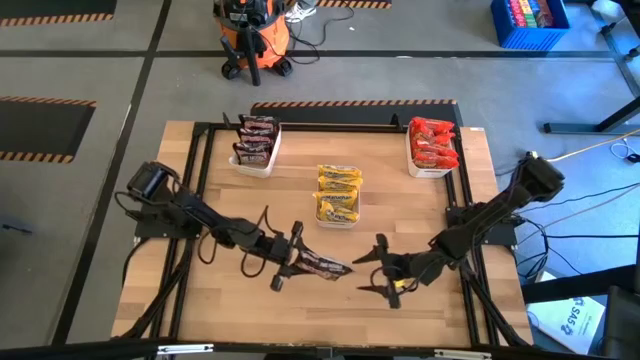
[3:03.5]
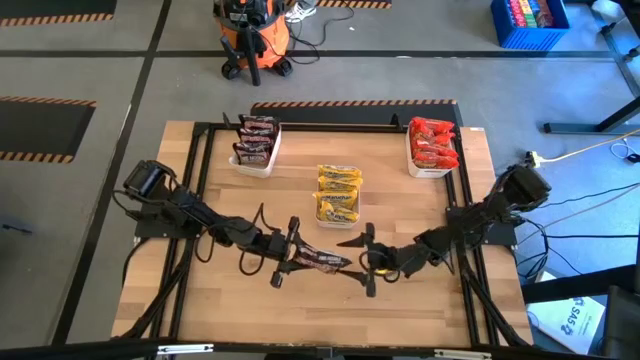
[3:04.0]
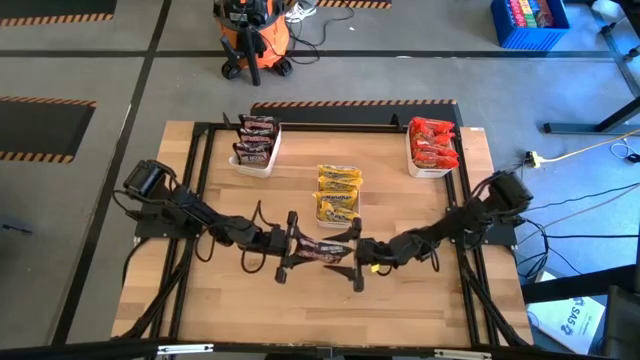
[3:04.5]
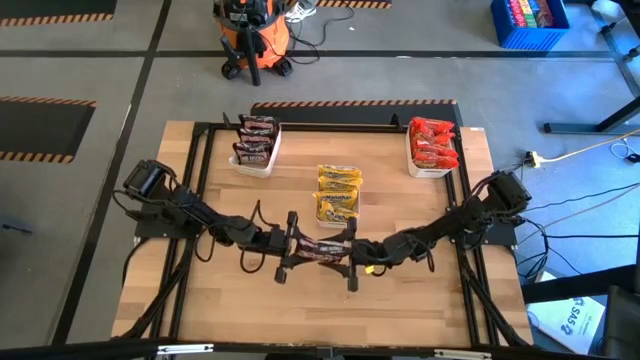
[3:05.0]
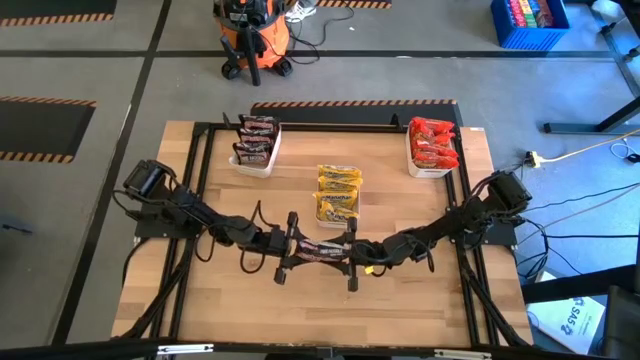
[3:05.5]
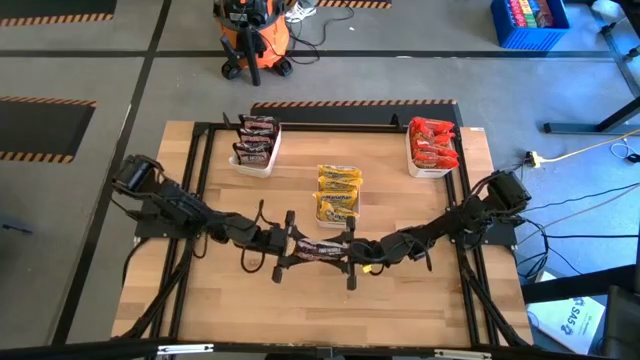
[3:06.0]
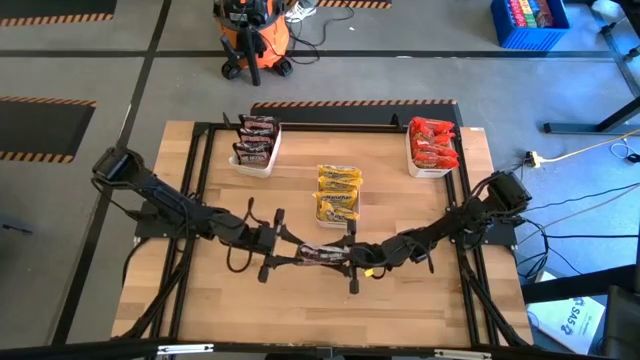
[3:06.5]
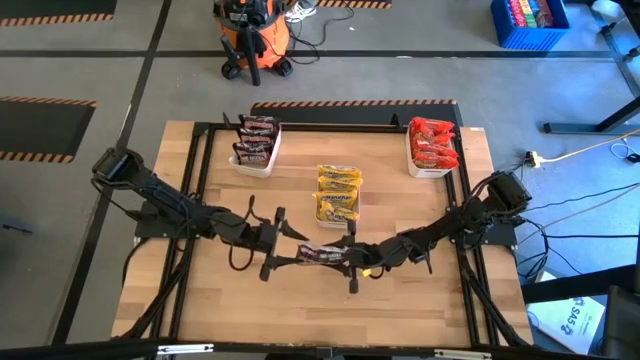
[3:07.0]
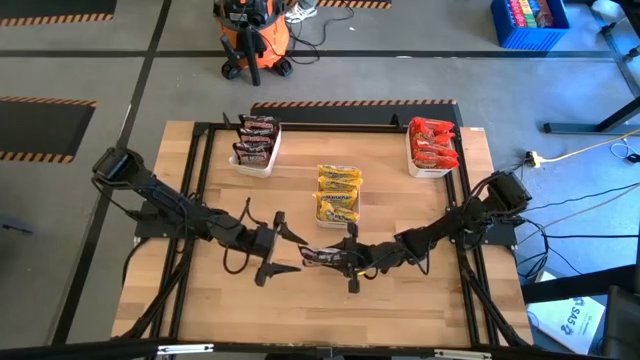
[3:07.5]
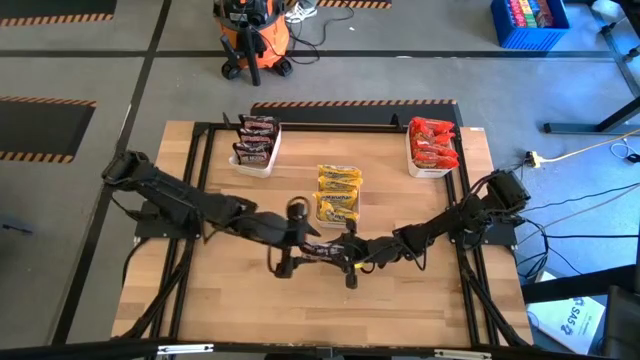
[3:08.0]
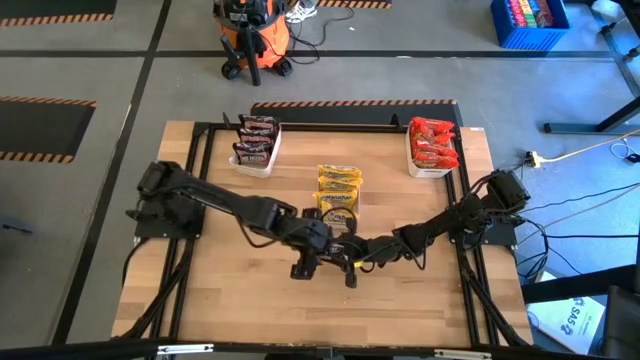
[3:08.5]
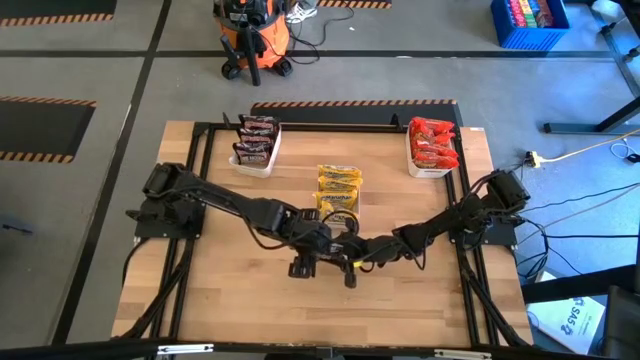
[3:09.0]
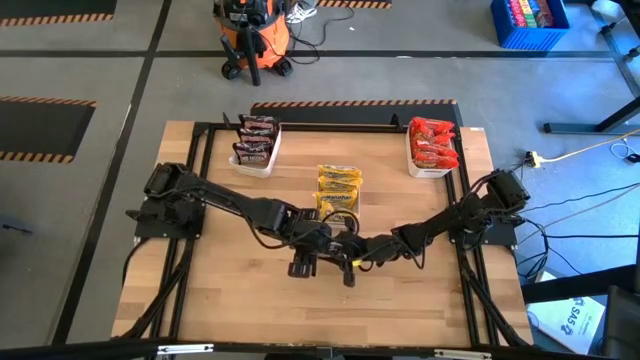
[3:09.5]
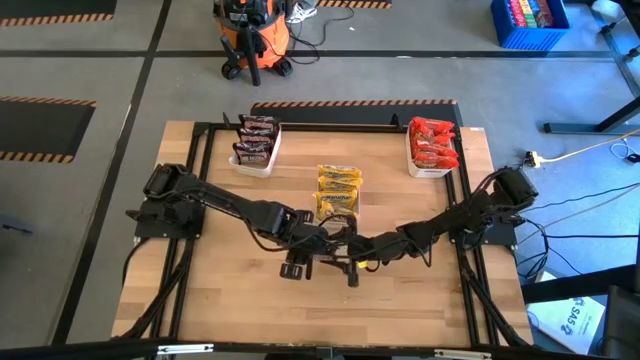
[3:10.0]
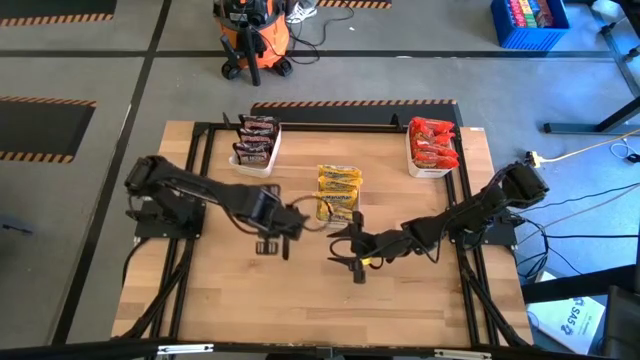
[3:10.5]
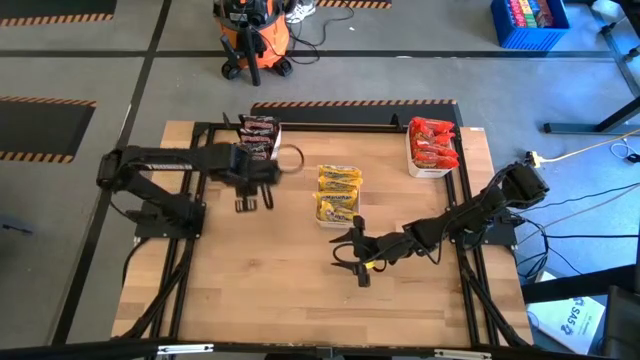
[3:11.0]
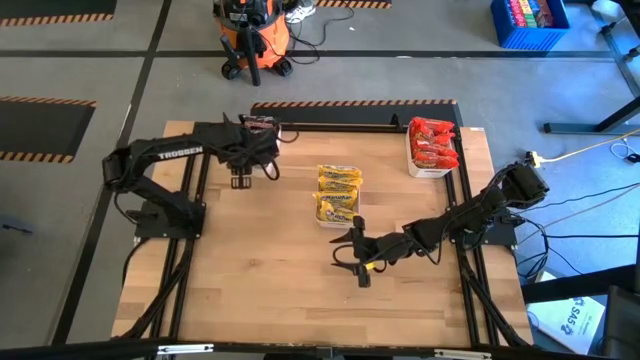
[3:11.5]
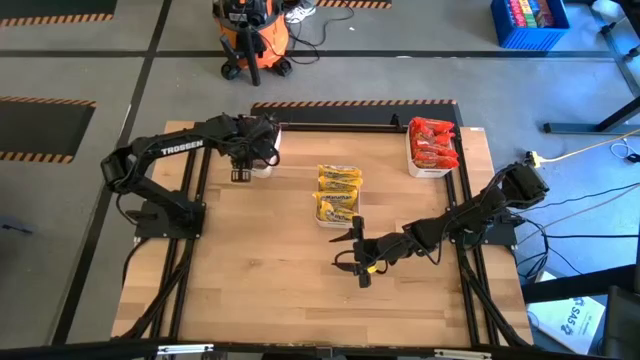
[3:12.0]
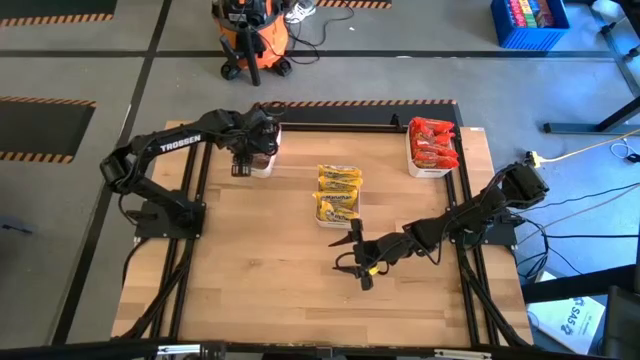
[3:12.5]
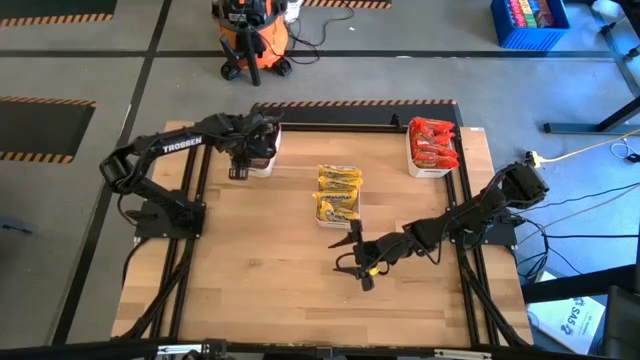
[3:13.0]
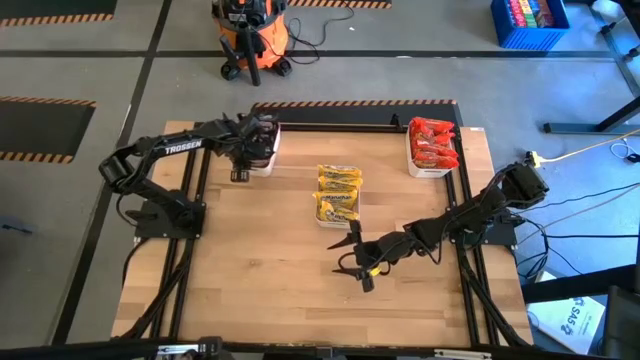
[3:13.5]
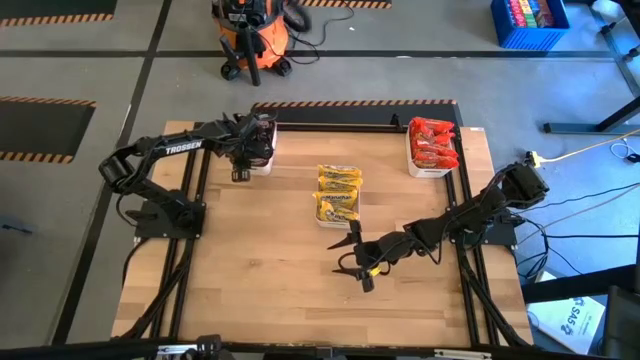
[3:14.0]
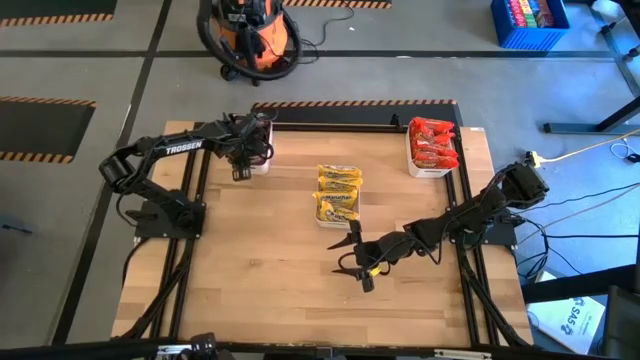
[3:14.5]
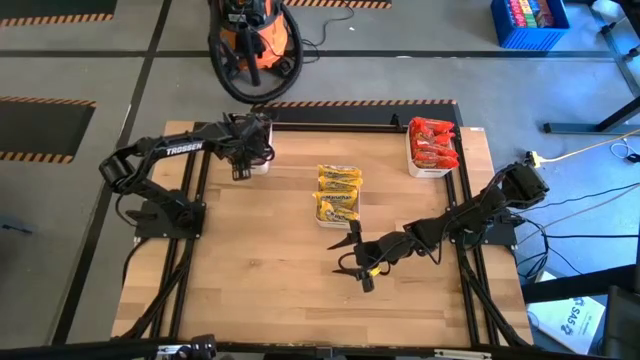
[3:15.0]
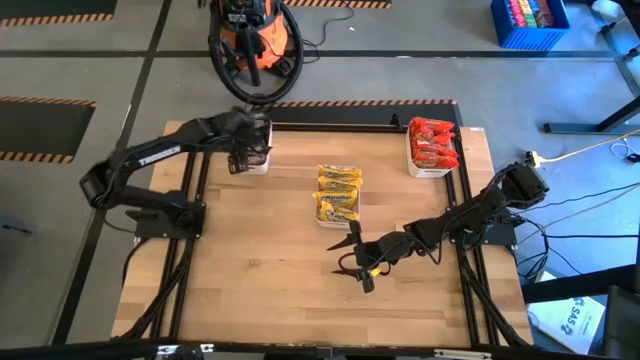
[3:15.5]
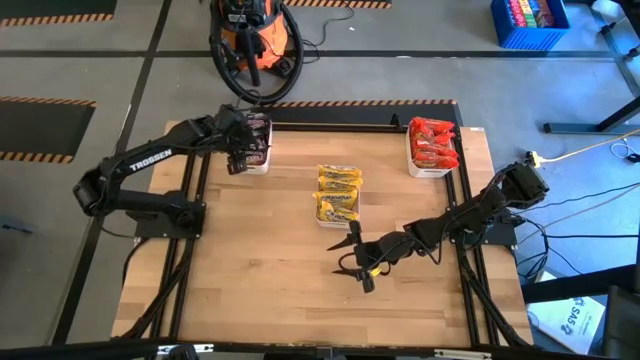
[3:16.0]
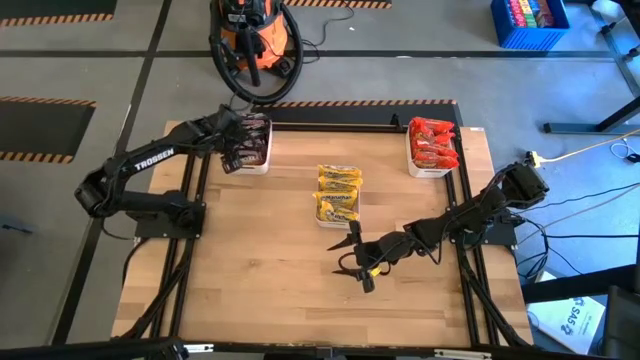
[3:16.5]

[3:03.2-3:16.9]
Task: Sort Maruchan noodles
Put the black noodle pack into the white left bin

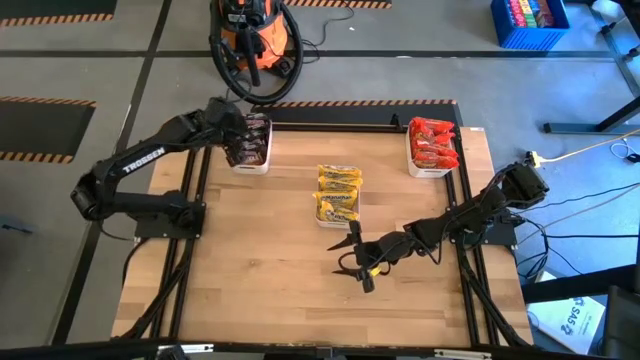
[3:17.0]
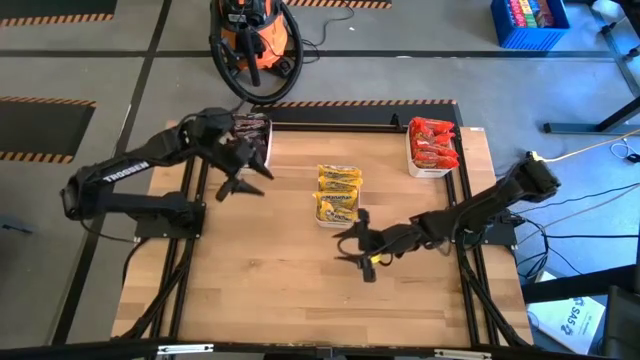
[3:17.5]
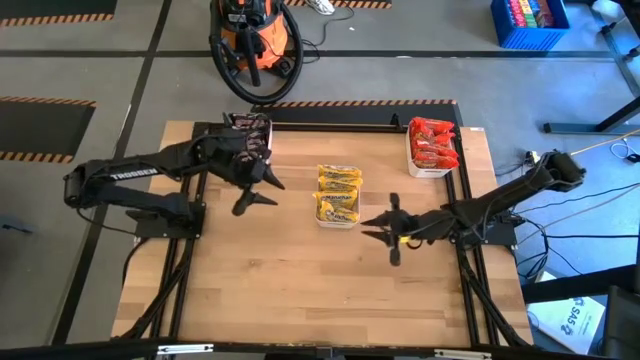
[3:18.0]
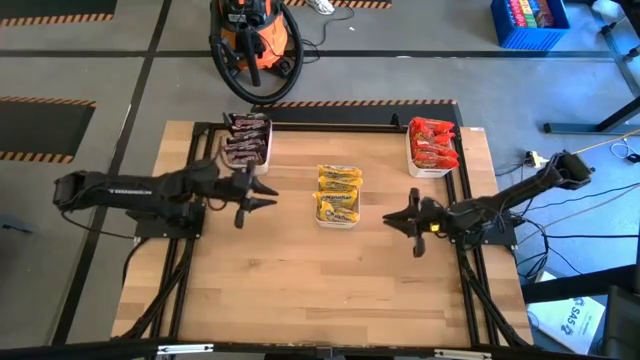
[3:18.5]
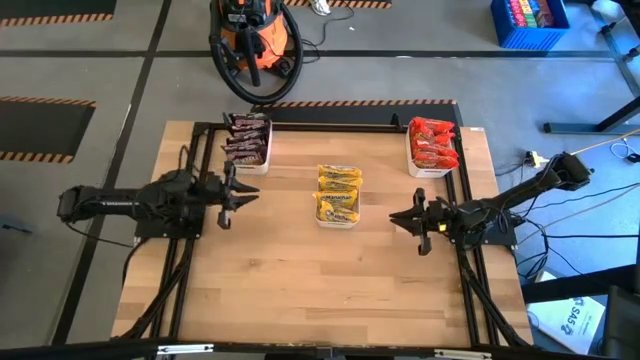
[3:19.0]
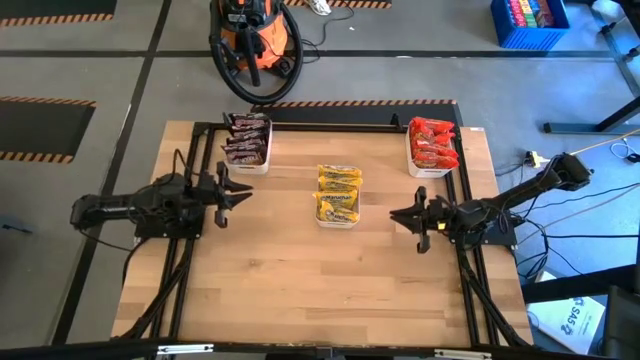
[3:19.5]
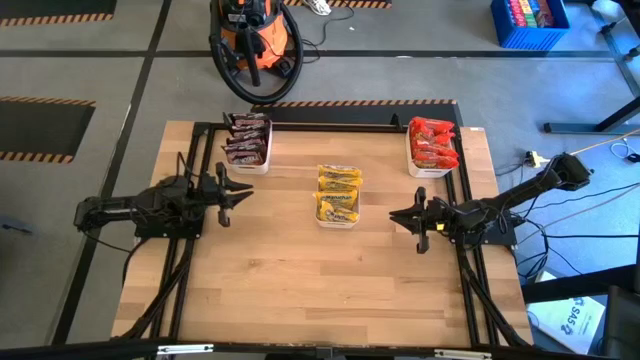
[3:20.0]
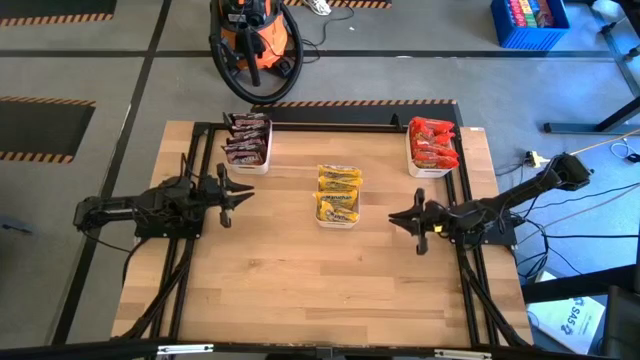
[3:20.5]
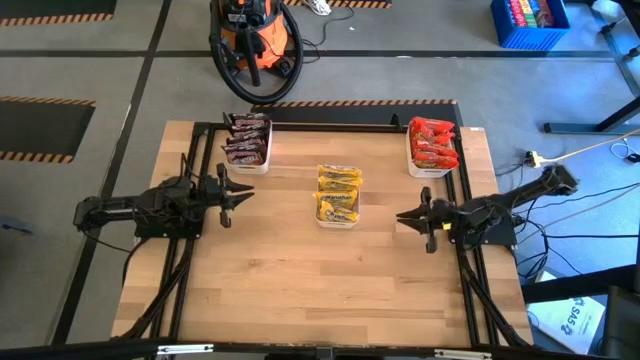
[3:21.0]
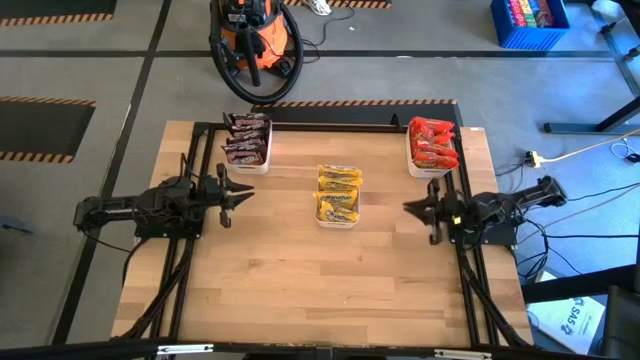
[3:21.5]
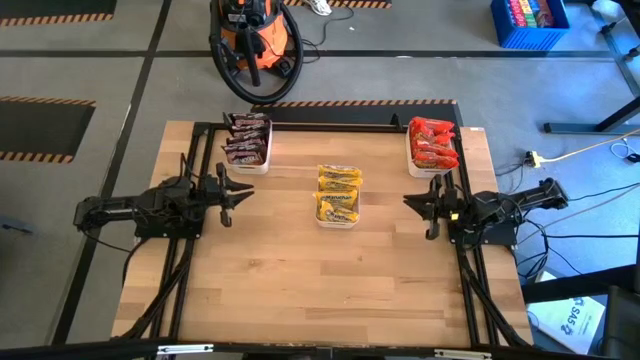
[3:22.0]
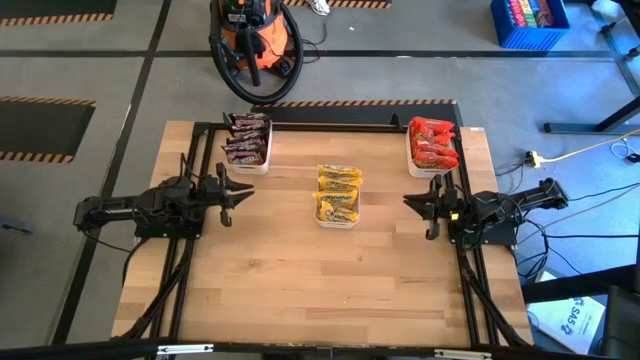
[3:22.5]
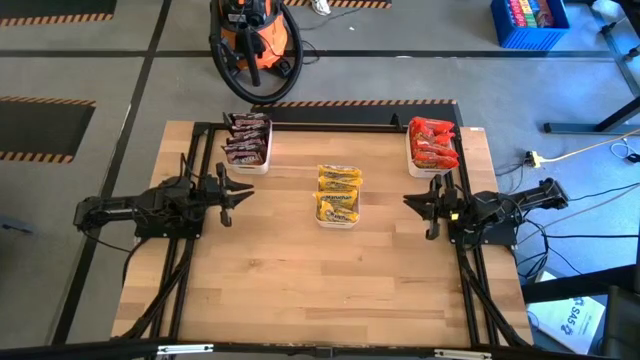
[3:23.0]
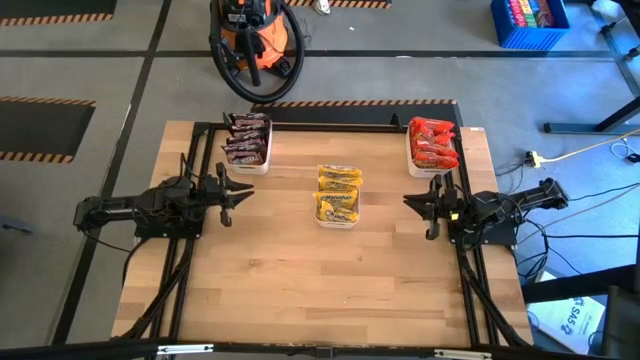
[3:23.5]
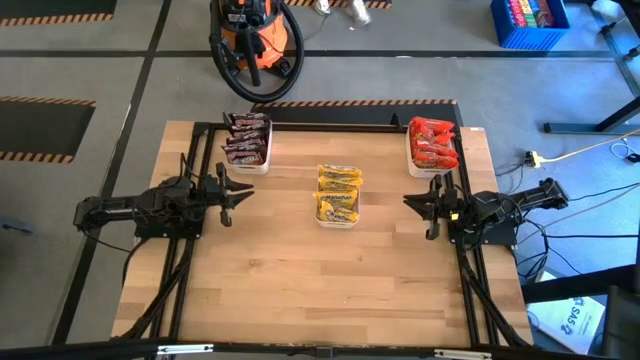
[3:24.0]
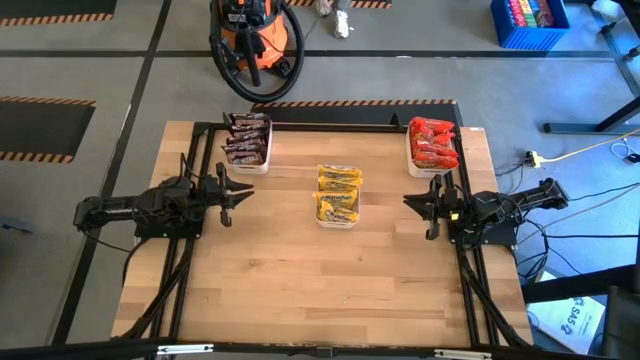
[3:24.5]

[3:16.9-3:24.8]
Return to Home Position
